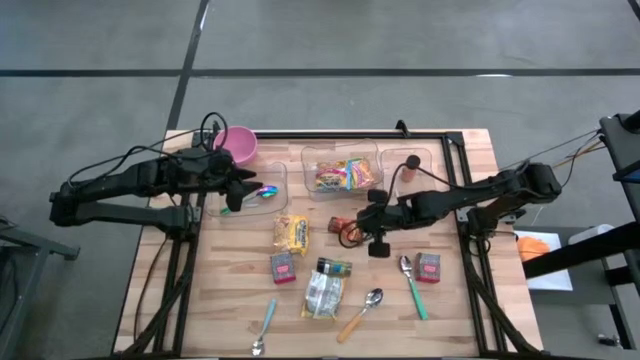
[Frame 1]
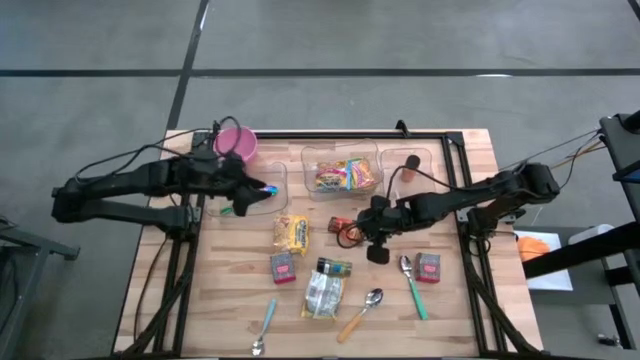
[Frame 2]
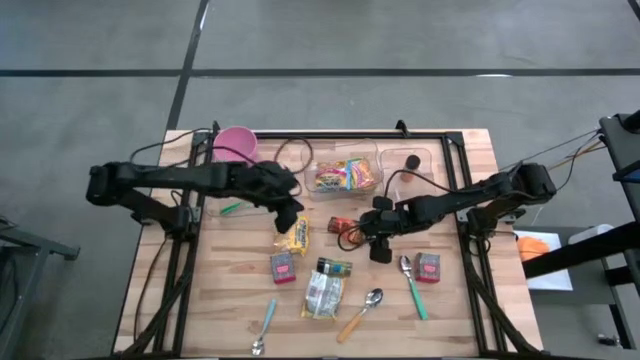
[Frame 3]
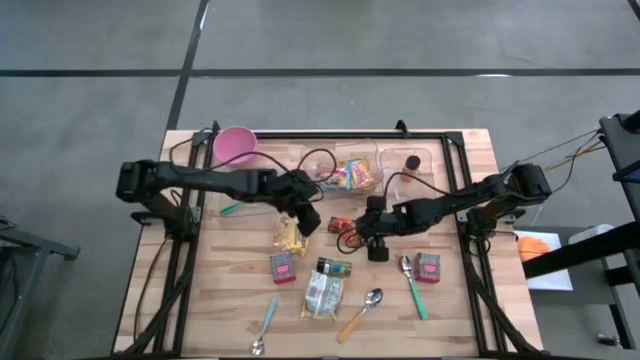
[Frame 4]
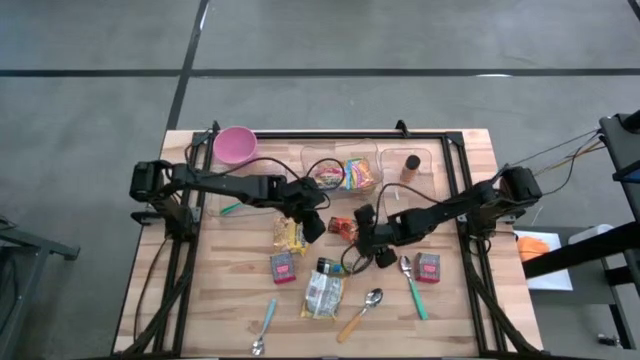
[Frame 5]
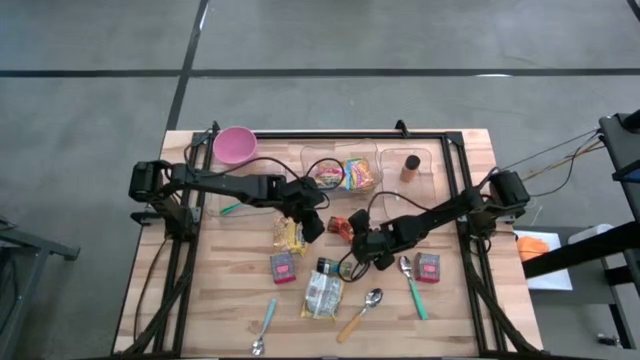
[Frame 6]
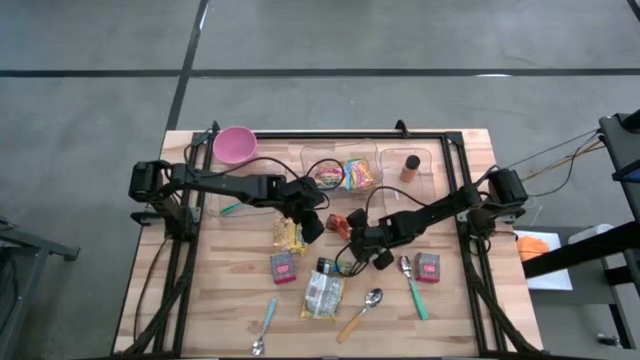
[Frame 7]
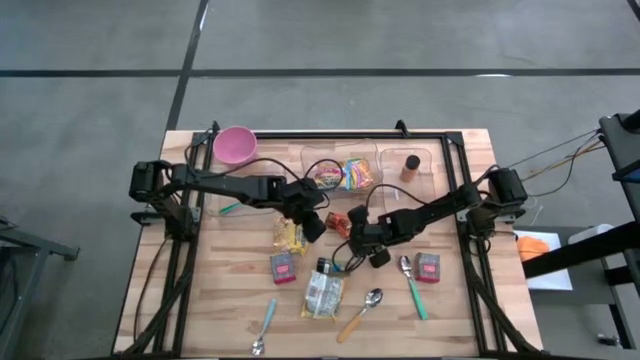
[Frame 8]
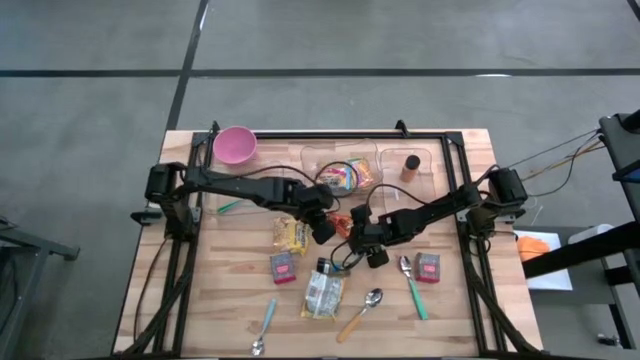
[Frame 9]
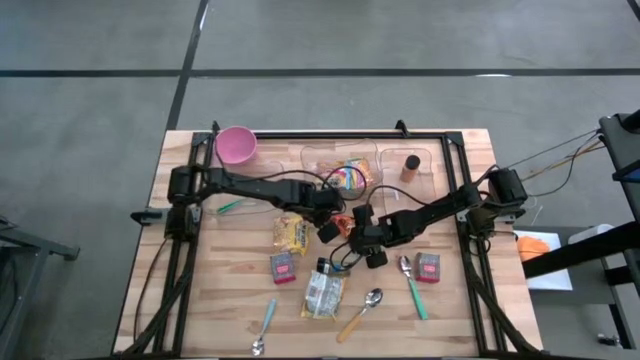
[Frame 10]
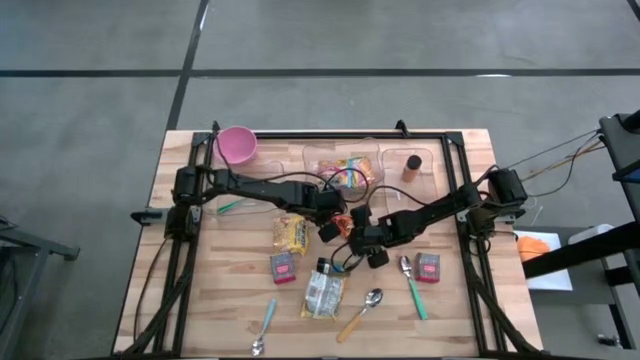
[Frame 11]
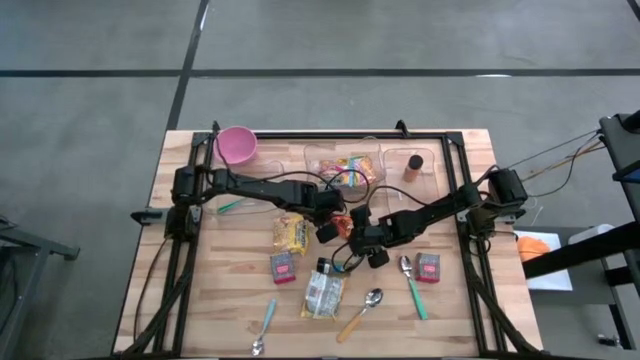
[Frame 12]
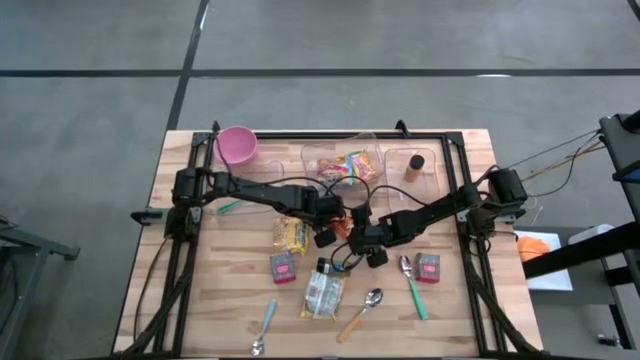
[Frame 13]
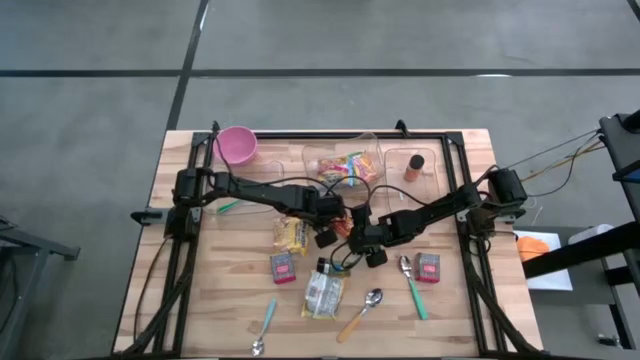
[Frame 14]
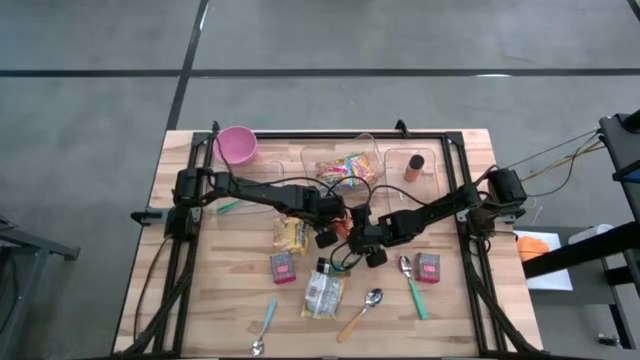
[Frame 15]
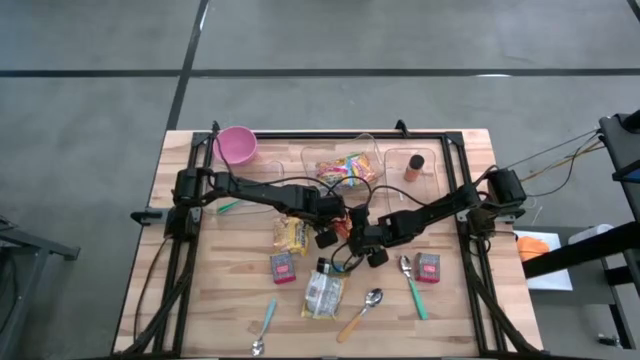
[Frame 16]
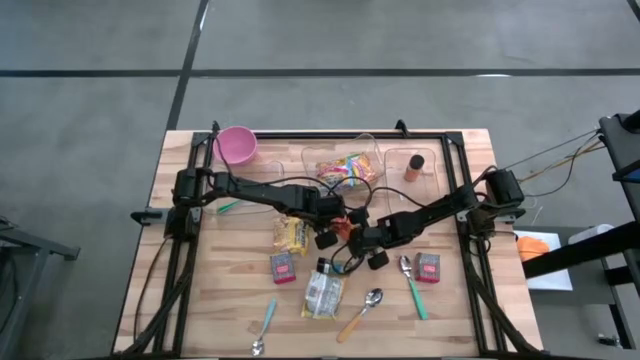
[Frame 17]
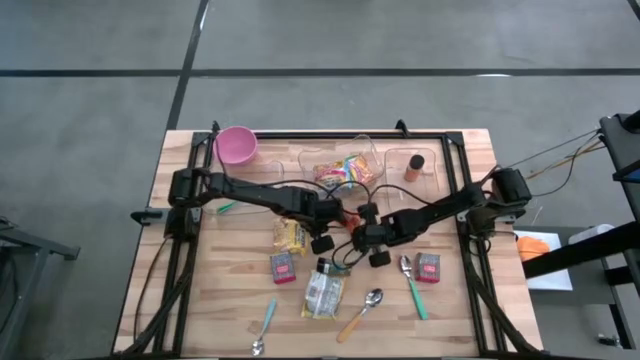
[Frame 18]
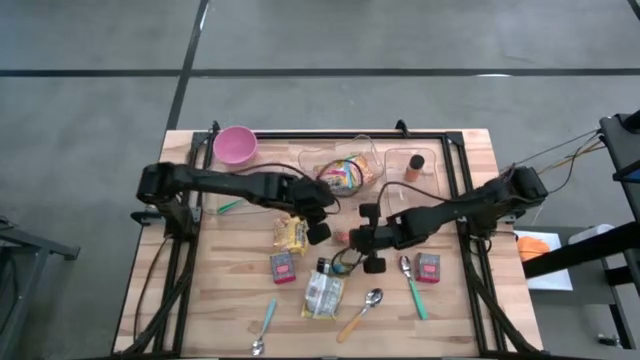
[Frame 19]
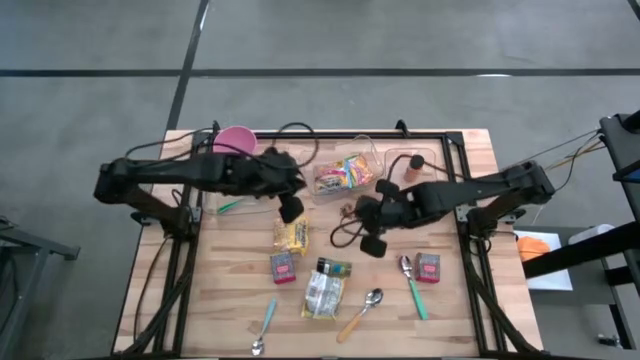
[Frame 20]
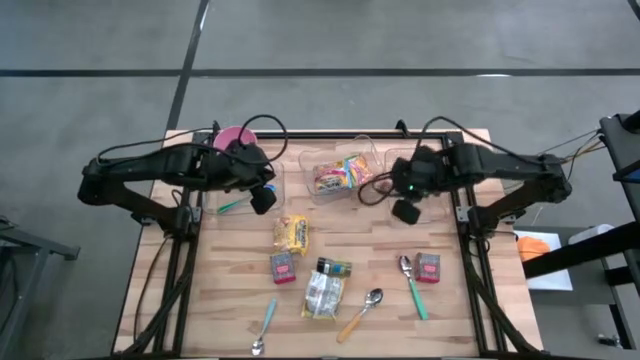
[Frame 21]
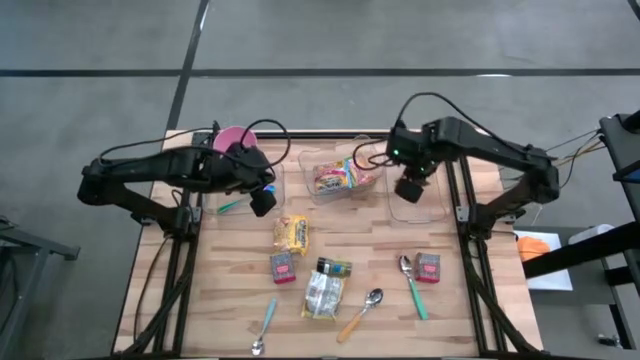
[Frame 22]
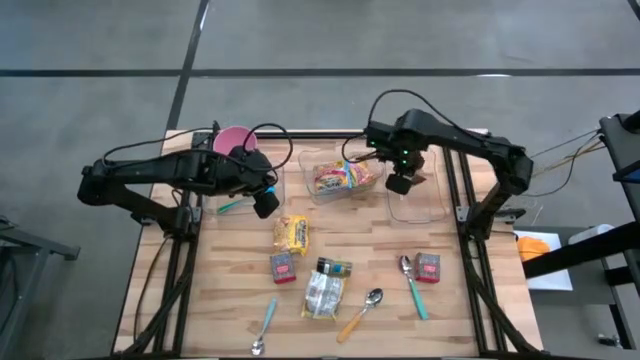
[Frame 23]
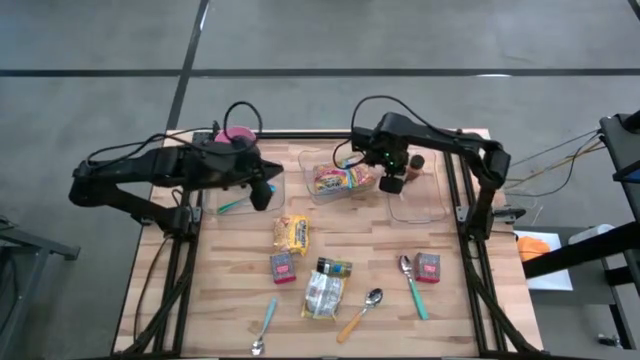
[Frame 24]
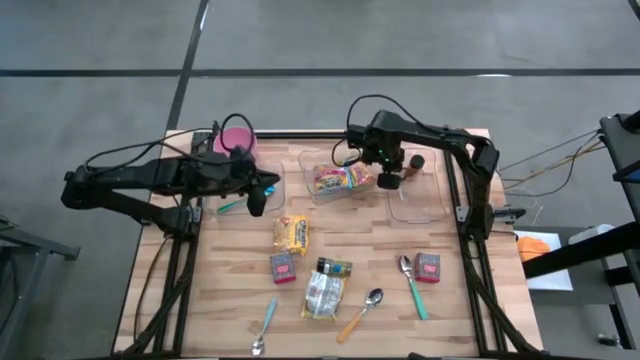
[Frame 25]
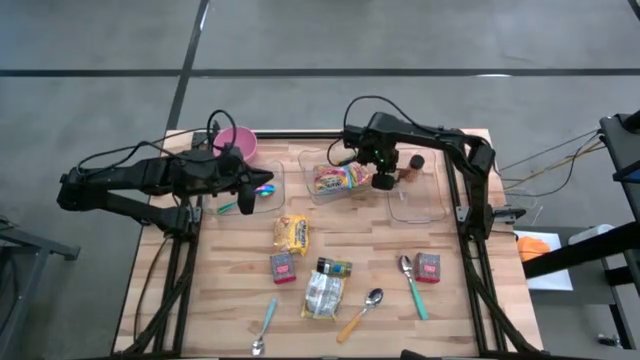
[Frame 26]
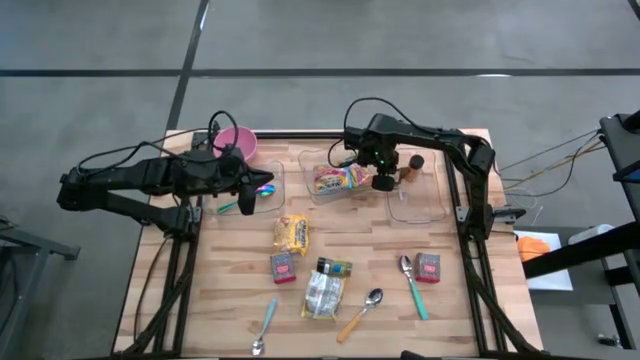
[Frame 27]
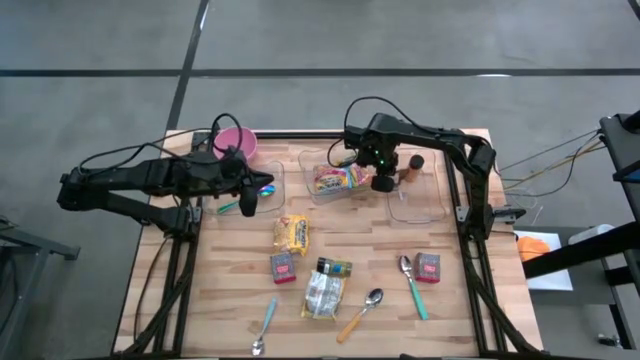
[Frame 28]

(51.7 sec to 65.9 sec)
Put the orange seasoning pack into the right transparent bin

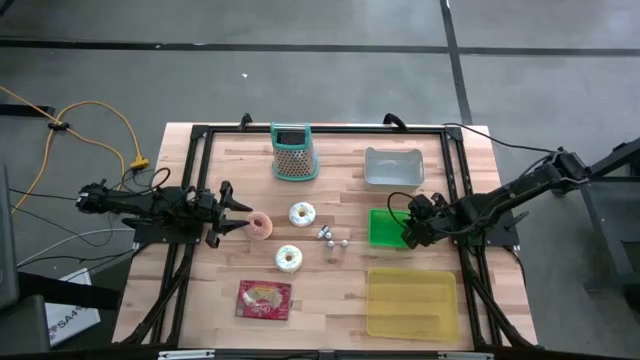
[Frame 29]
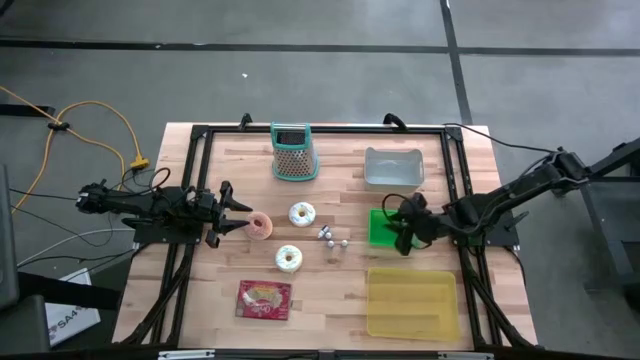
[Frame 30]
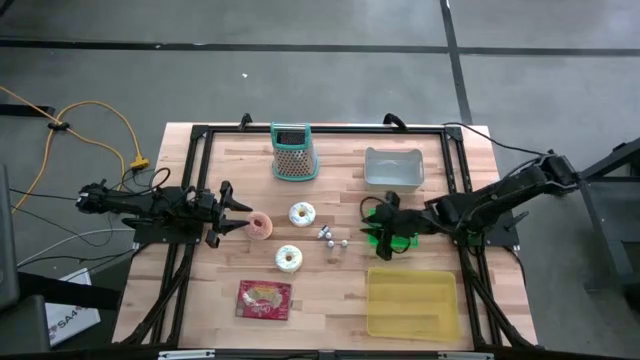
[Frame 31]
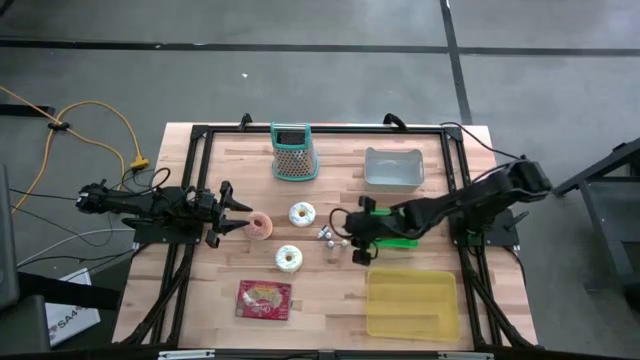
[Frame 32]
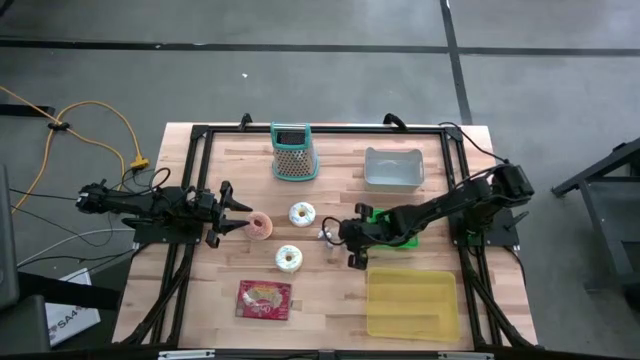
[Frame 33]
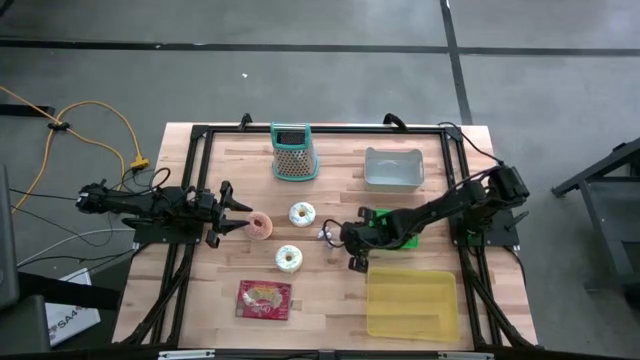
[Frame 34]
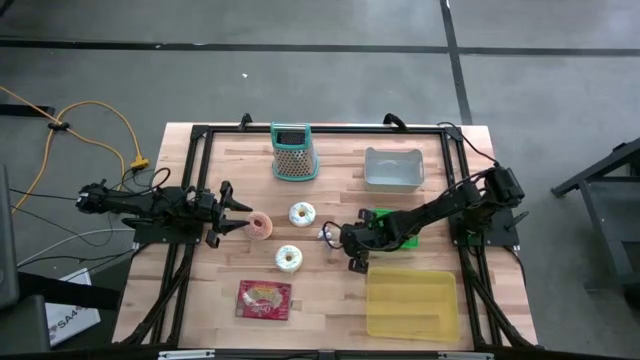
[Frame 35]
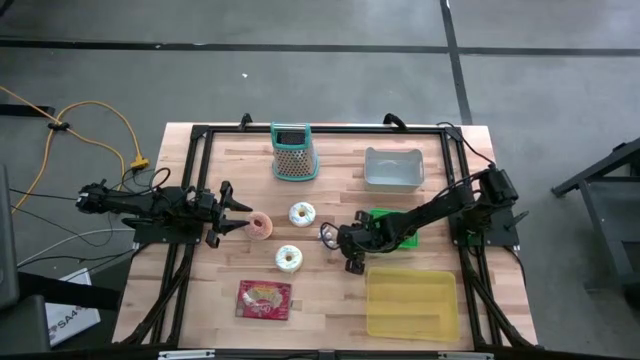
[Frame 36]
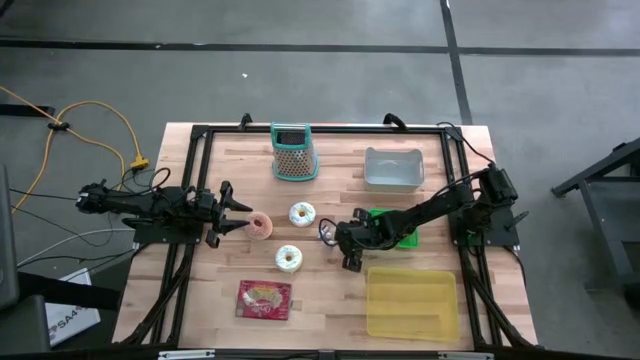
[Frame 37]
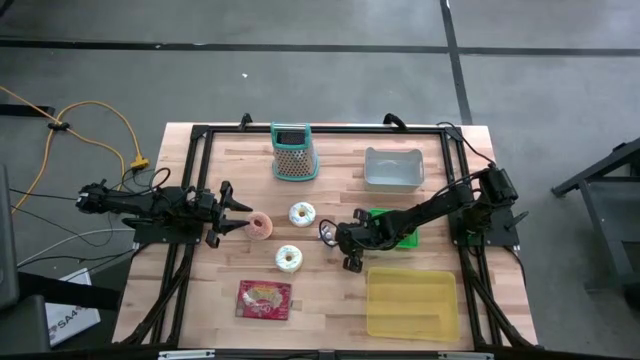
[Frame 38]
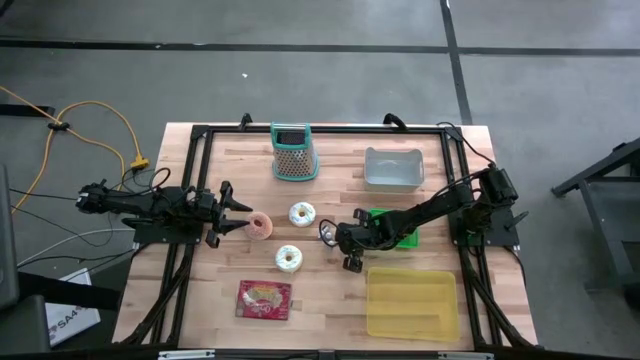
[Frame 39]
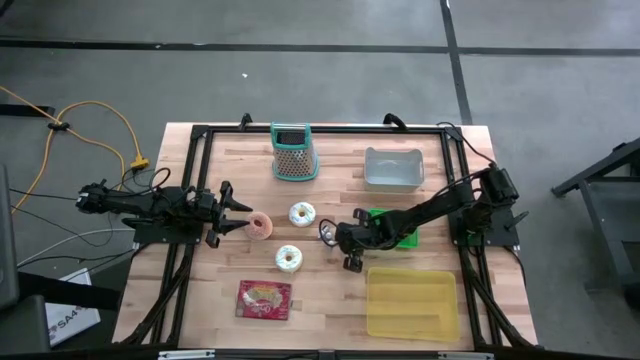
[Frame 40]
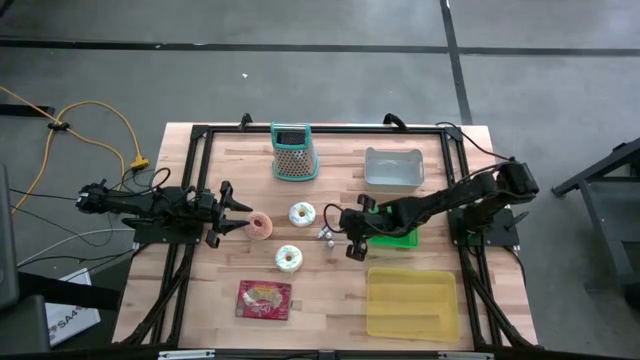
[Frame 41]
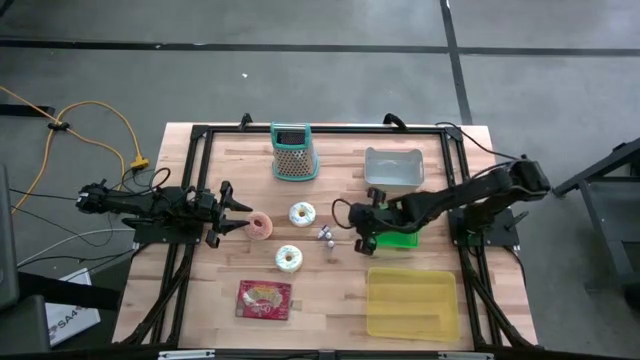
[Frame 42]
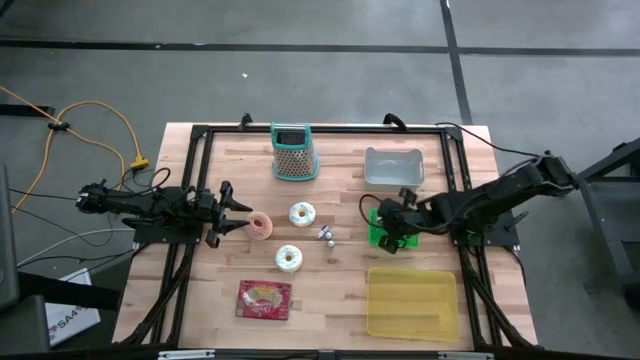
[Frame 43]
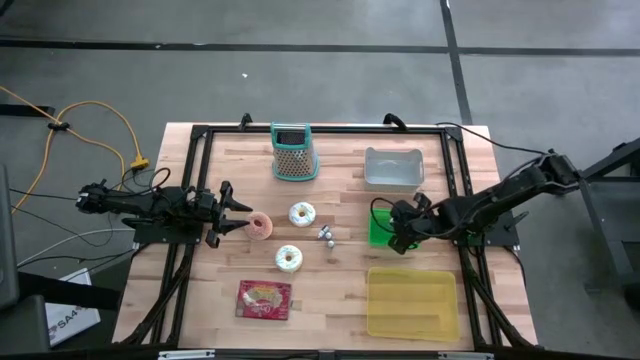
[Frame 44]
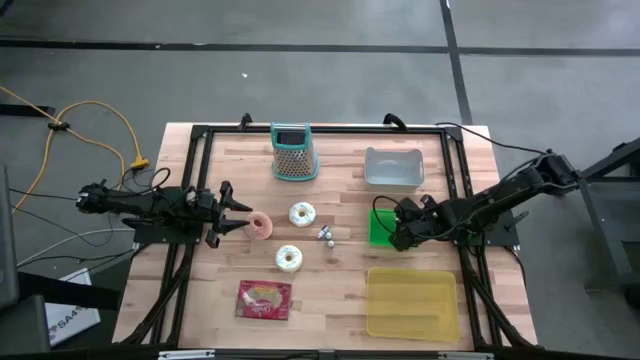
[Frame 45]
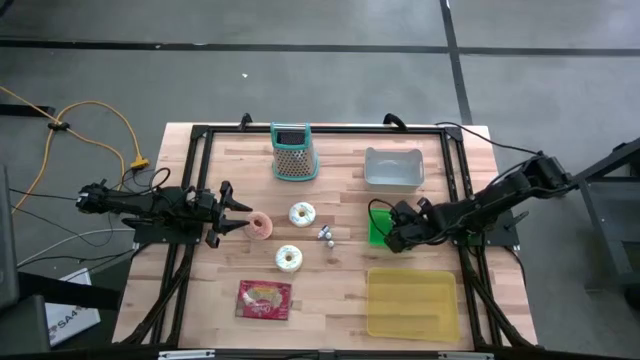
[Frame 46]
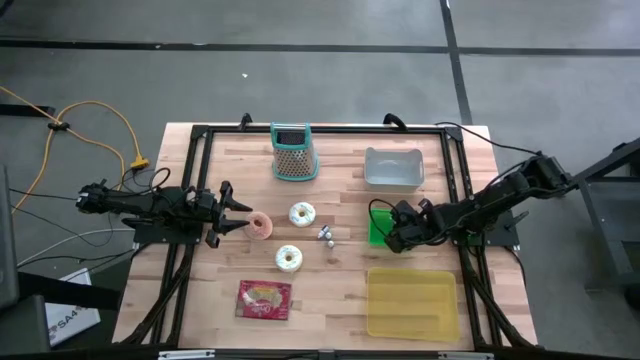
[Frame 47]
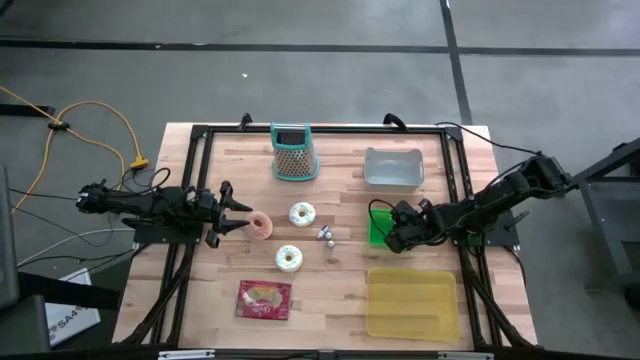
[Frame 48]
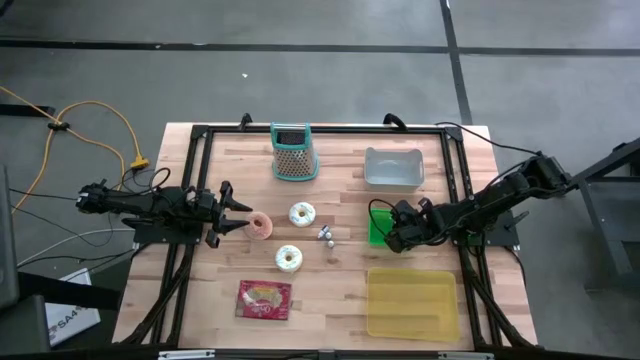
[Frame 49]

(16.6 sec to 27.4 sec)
Put the red food coloring bottle into the green bin
